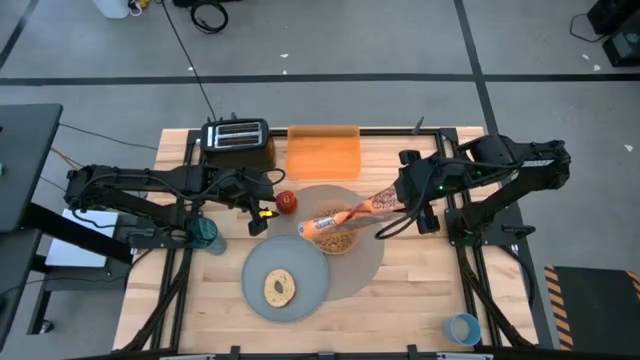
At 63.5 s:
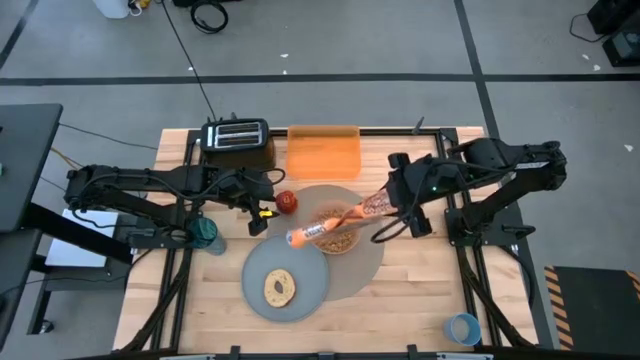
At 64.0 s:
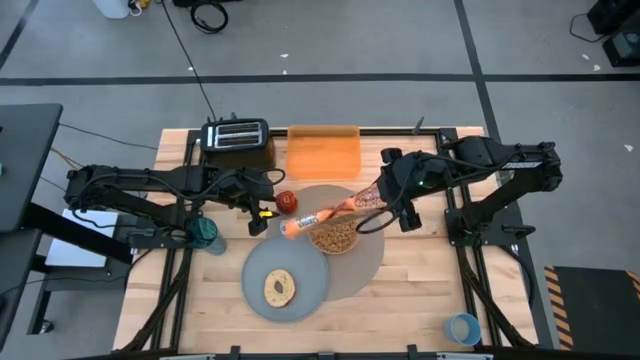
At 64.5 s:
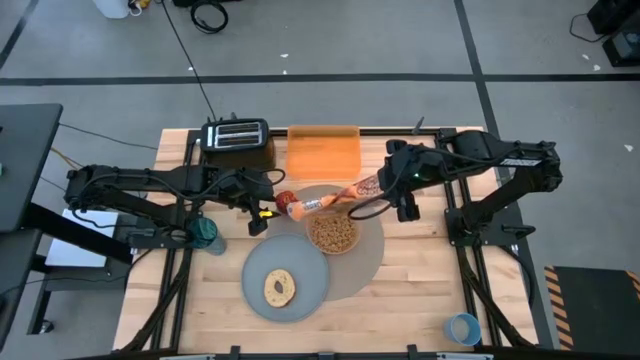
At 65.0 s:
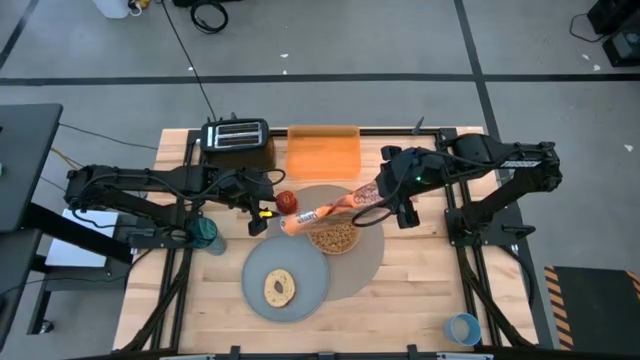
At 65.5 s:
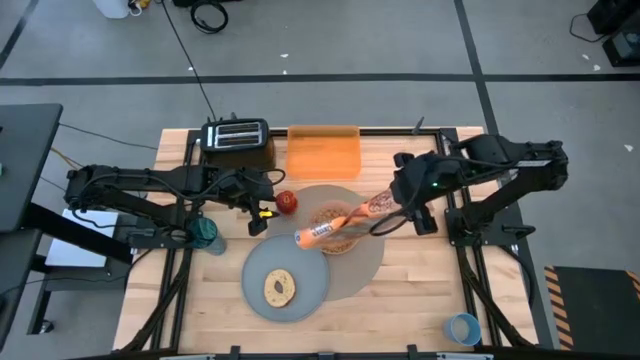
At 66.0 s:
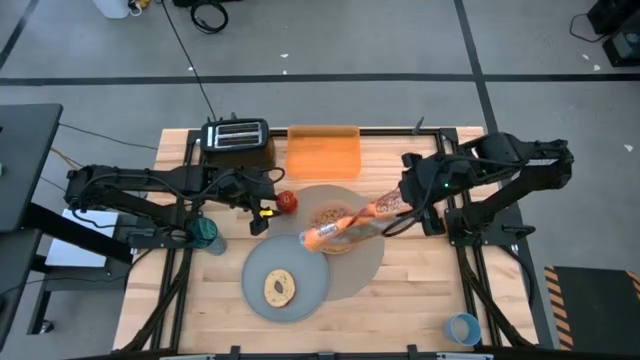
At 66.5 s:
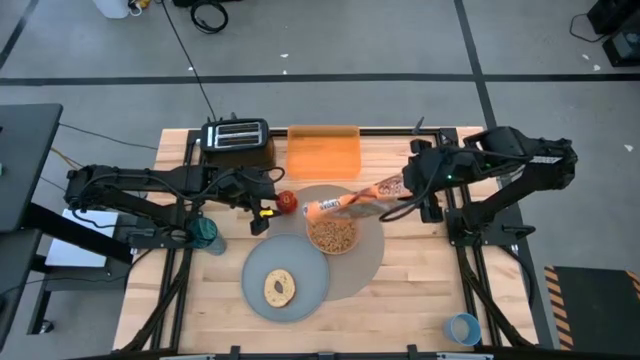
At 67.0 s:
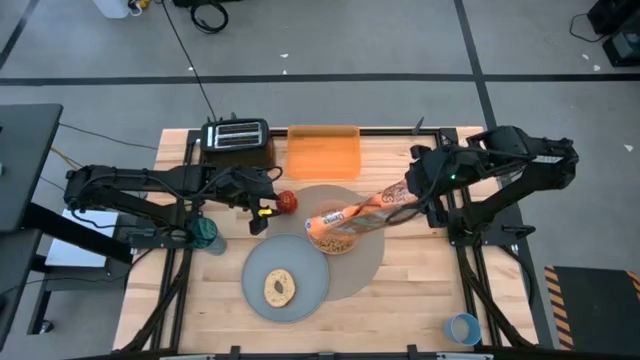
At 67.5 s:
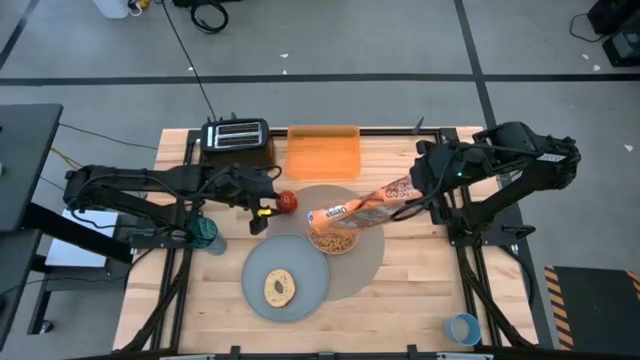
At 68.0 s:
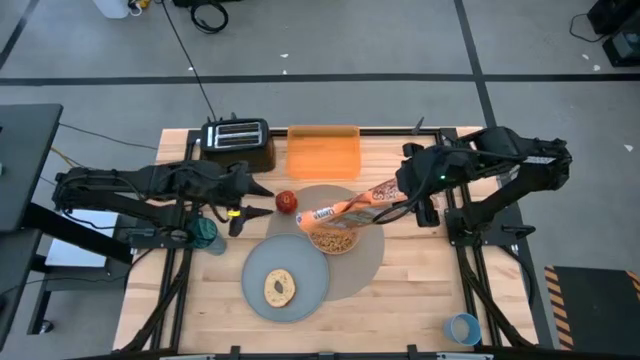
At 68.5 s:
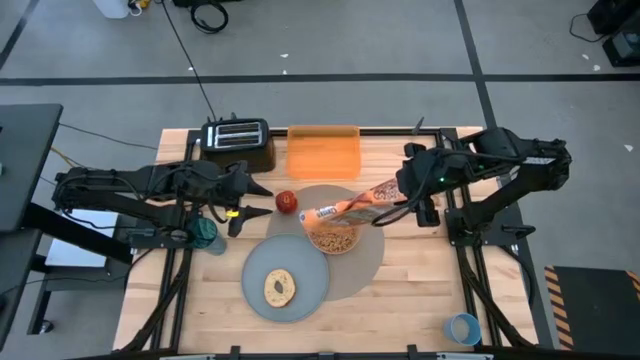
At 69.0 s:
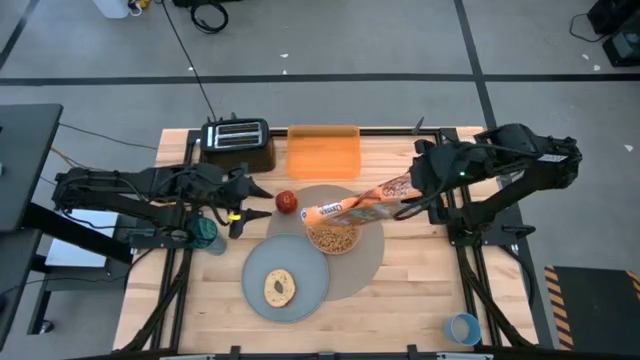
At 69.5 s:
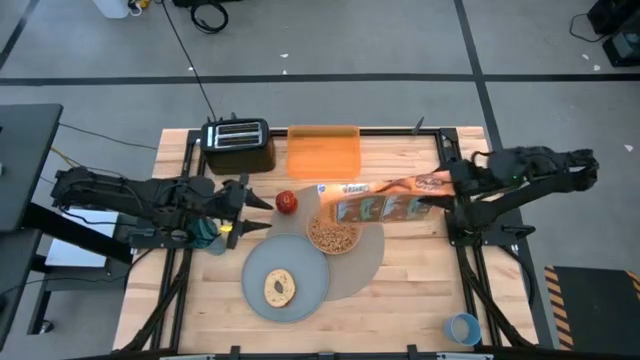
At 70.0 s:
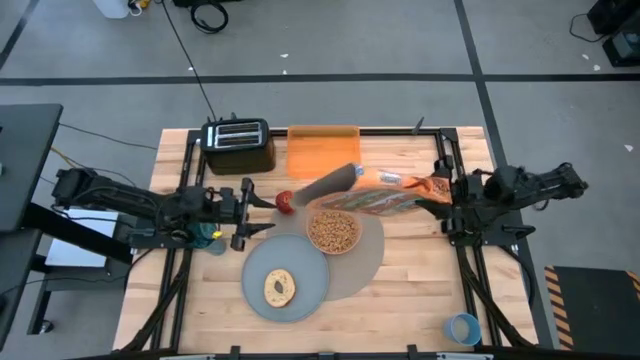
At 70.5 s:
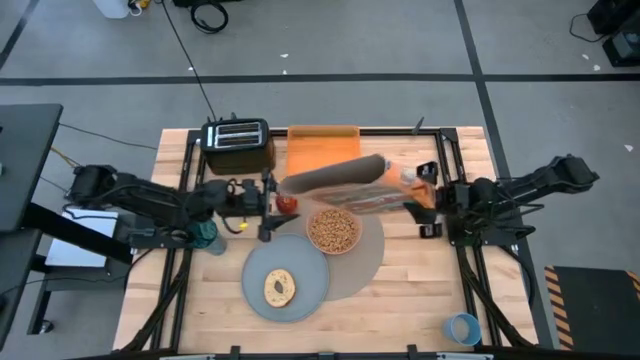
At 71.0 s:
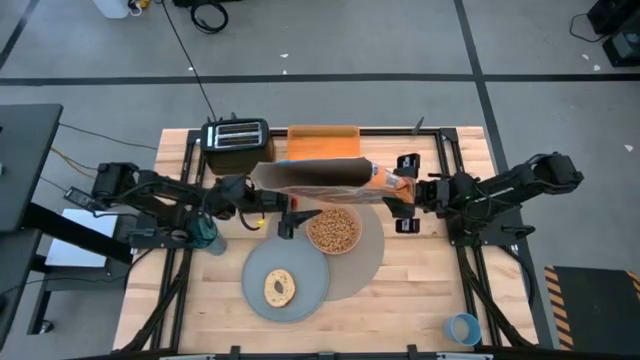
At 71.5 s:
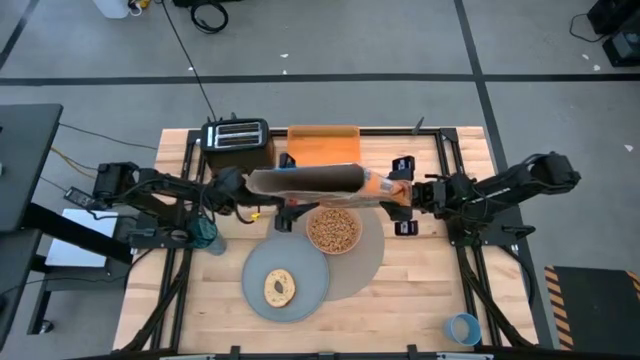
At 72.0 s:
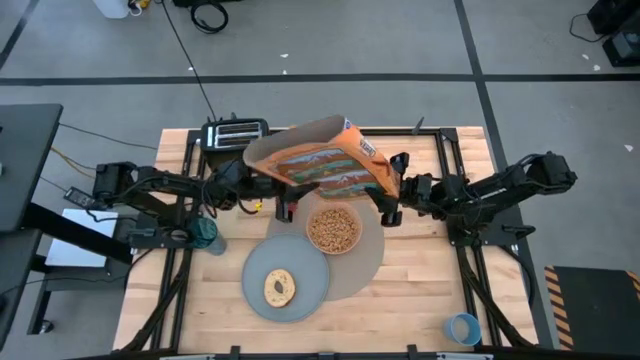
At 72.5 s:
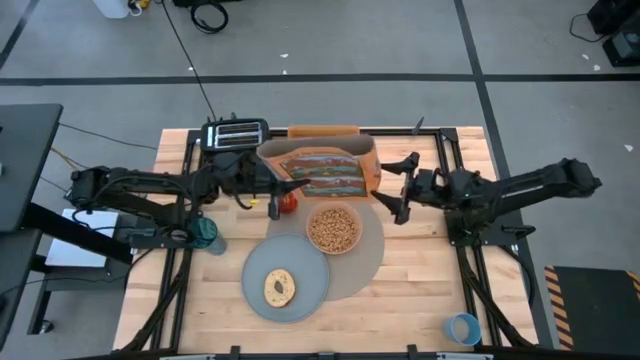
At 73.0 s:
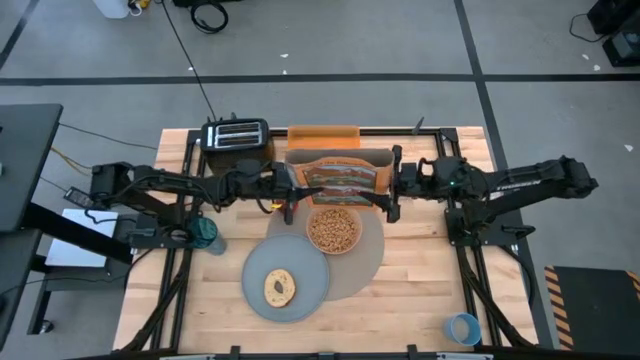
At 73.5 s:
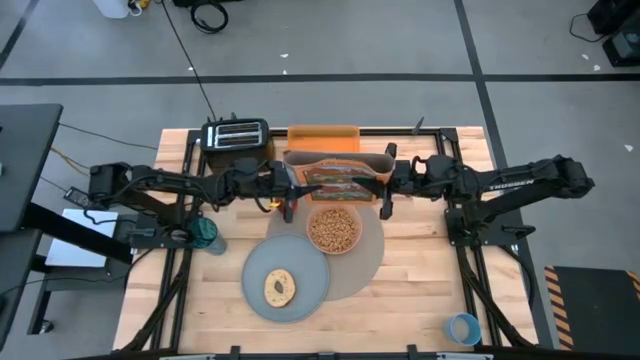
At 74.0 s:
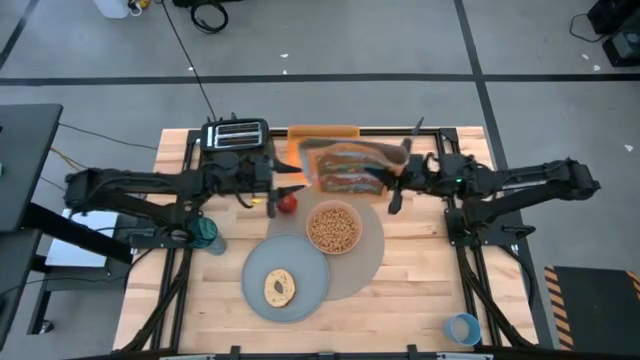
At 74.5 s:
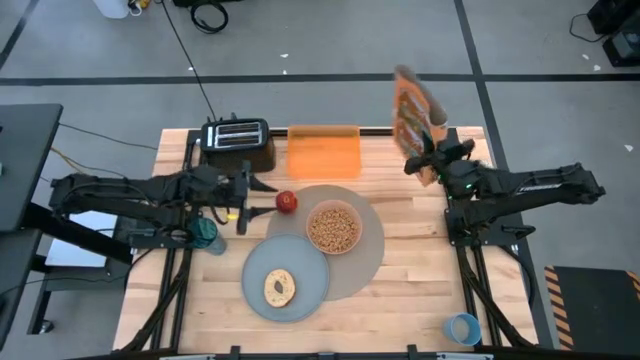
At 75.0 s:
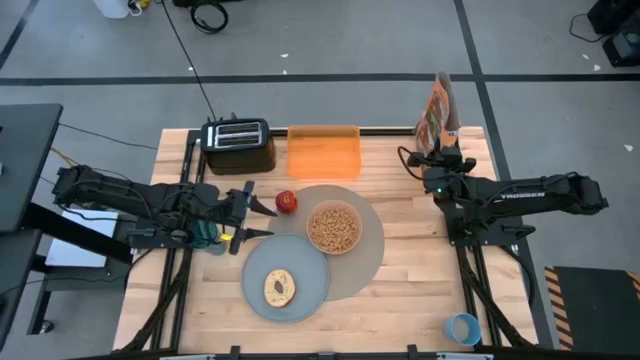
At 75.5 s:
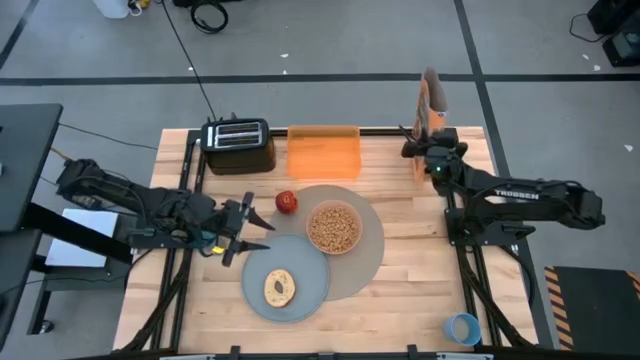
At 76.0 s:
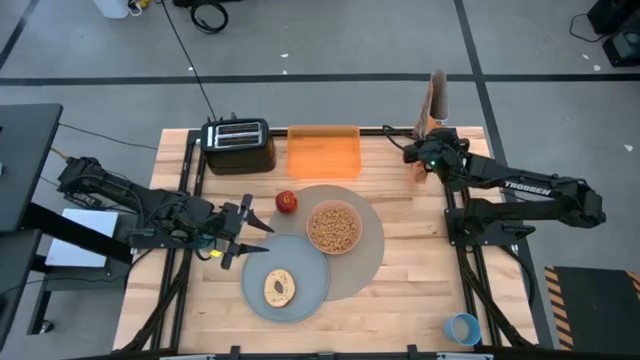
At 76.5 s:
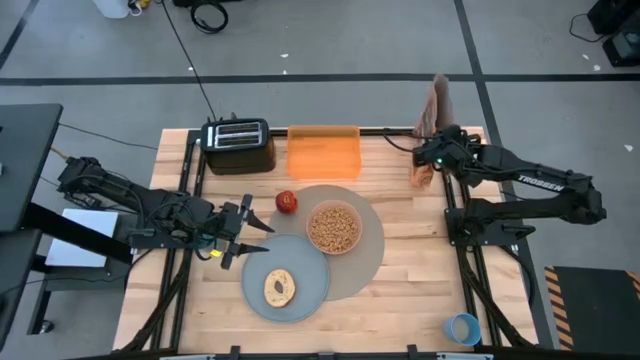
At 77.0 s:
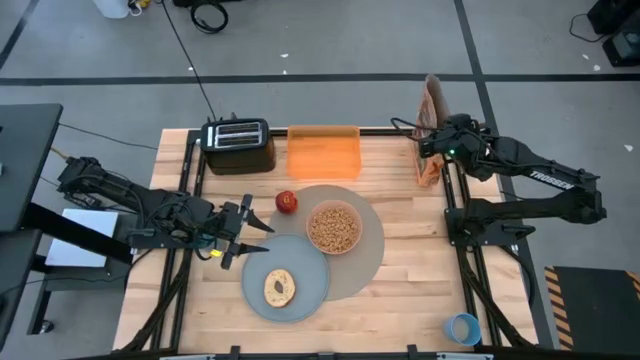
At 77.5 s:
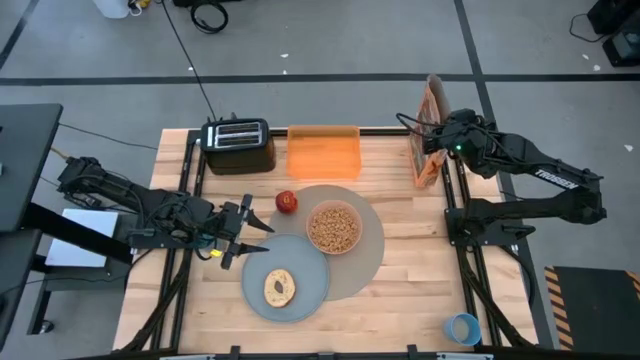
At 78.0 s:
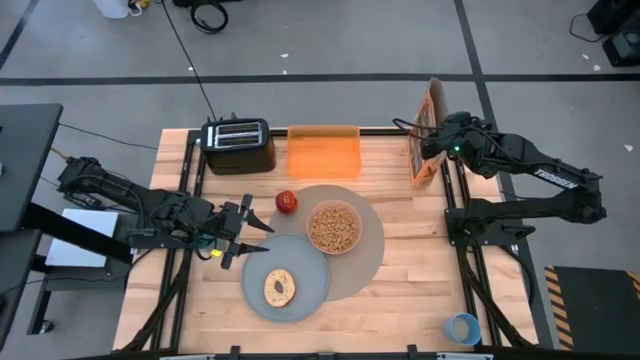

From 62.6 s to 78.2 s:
Task: Arrange a breakfast setting
Pour the cereal from the cereal box into the pink bowl

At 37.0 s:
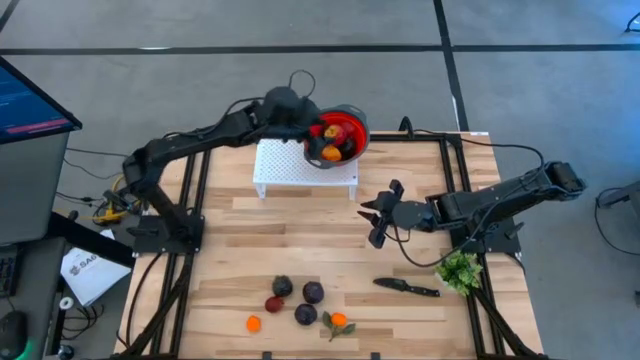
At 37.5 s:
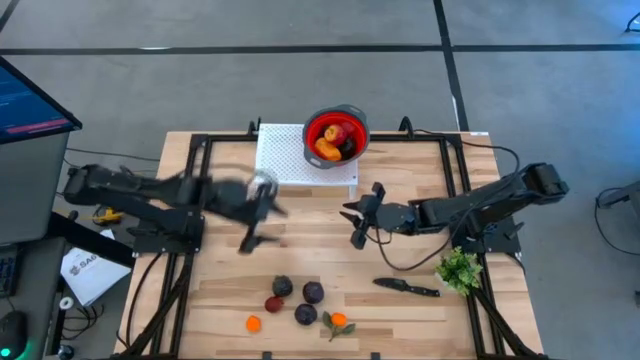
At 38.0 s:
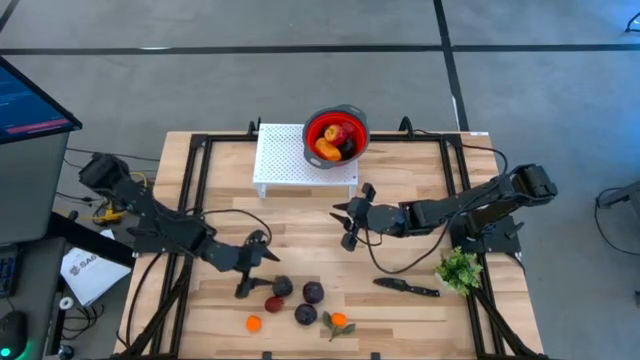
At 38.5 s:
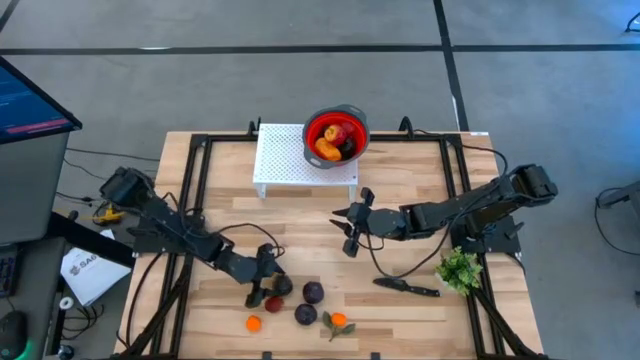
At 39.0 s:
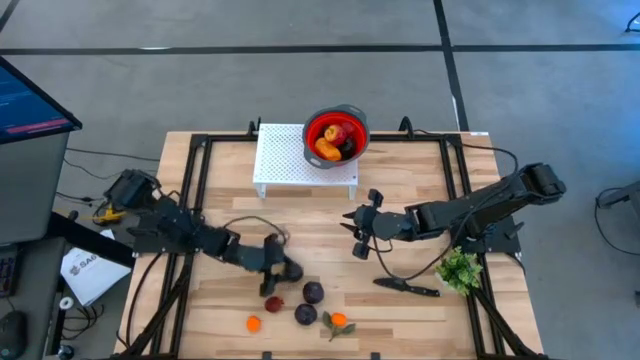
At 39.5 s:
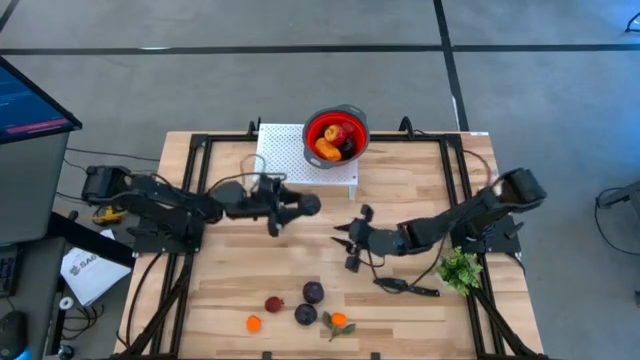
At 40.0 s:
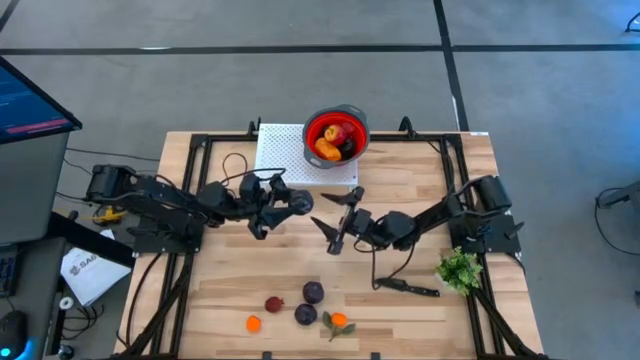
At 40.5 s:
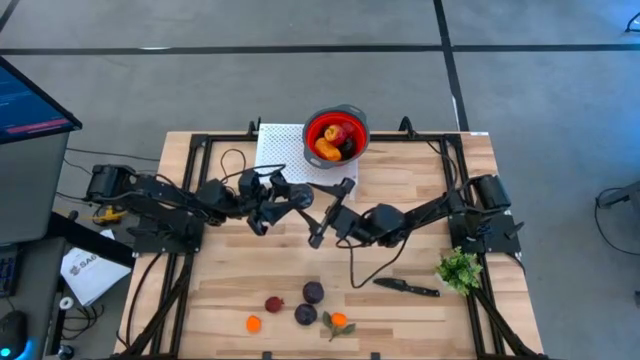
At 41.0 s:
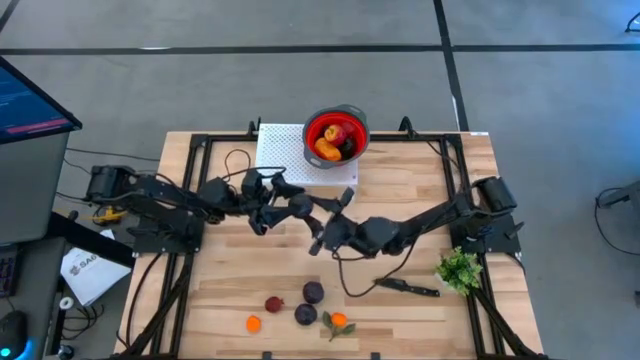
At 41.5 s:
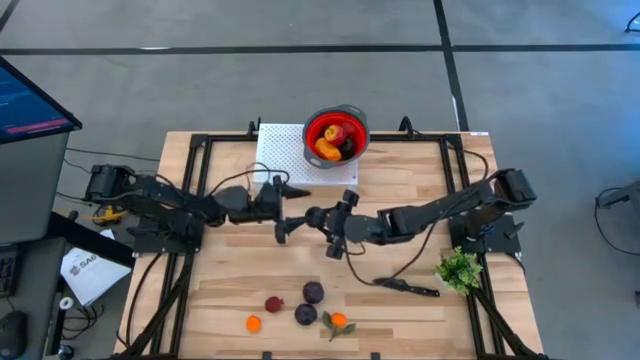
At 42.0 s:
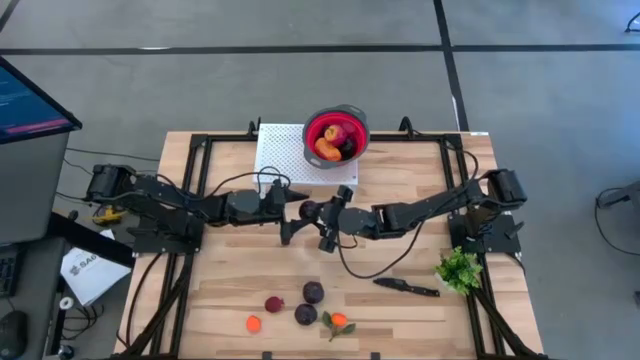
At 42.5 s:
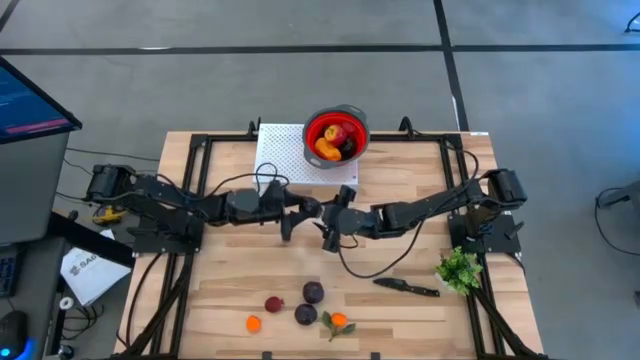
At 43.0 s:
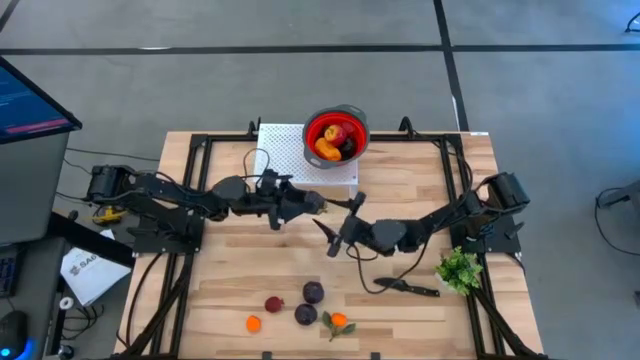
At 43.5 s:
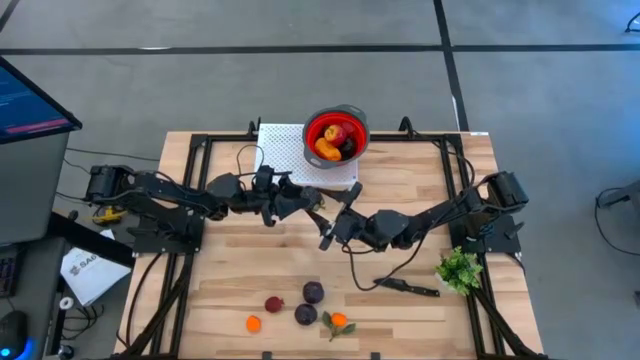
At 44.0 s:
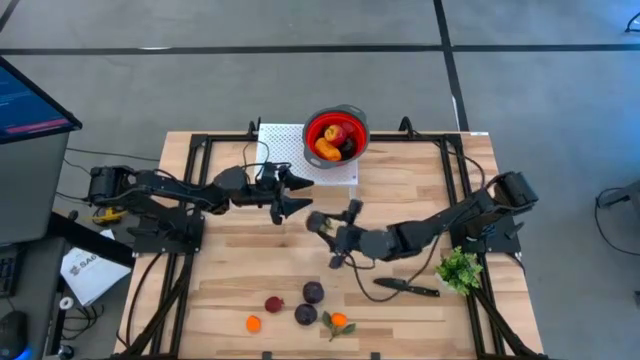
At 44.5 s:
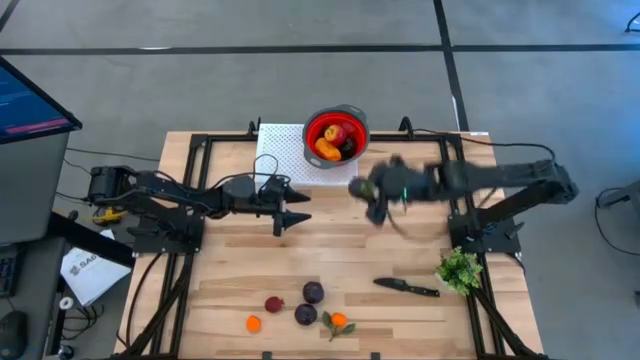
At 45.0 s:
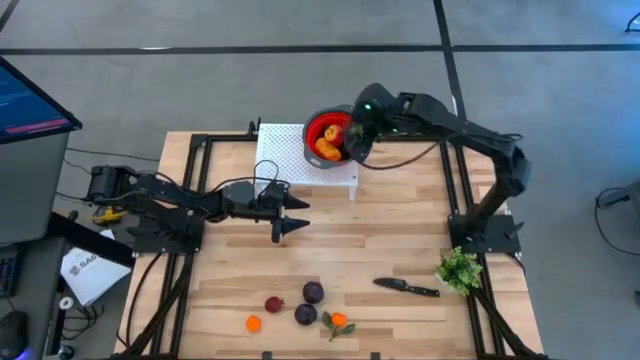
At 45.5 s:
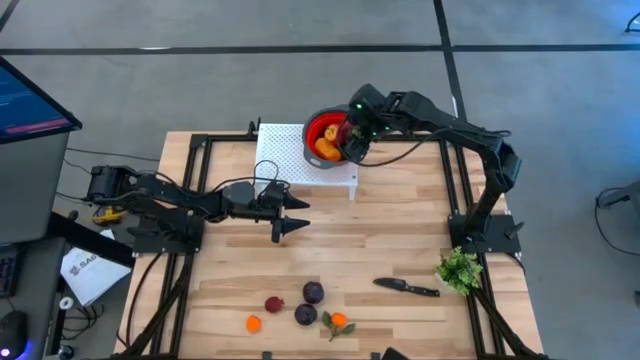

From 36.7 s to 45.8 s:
Task: Pick & Place Fruit
Put the mangosteen into the red strainer on the shelf
